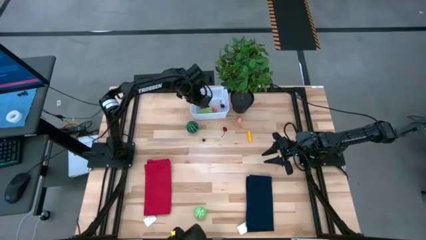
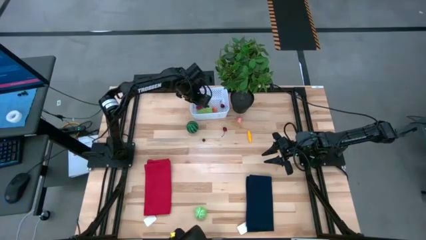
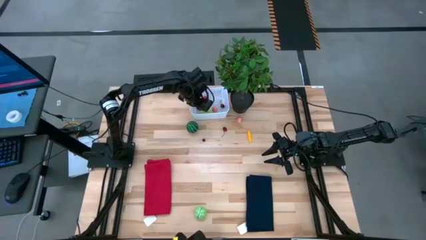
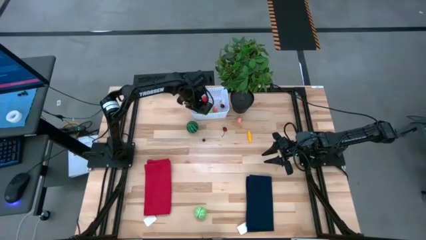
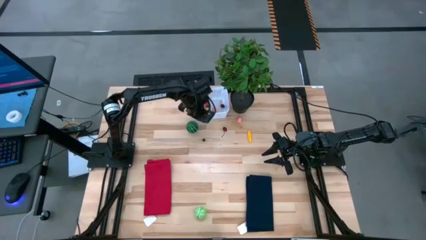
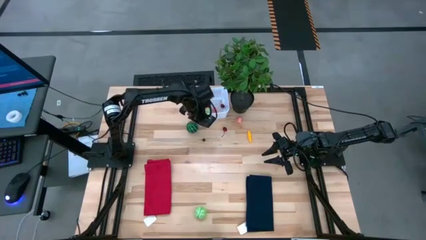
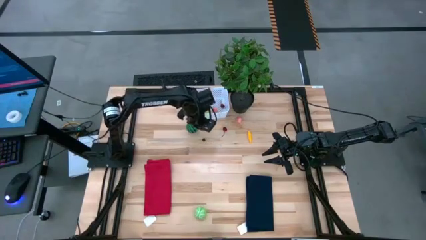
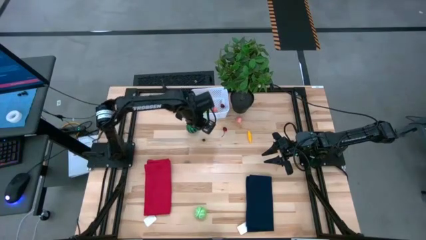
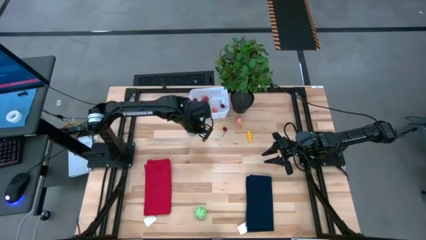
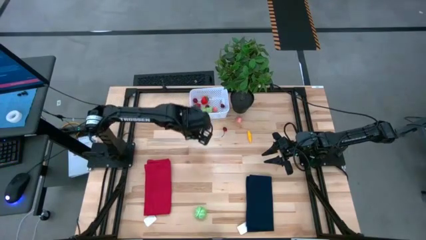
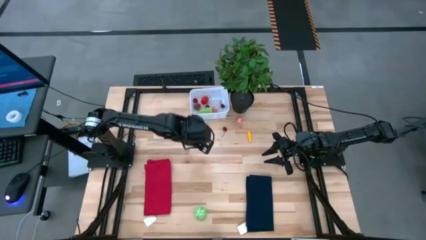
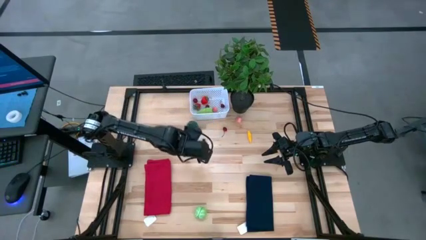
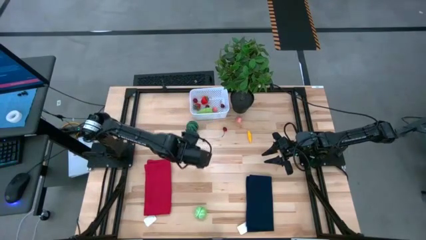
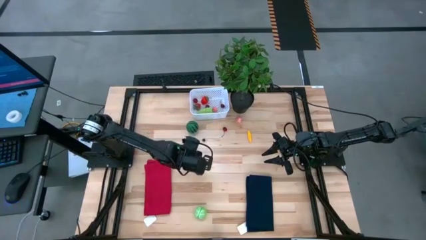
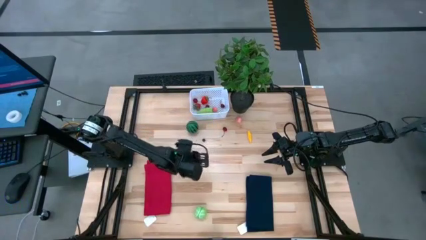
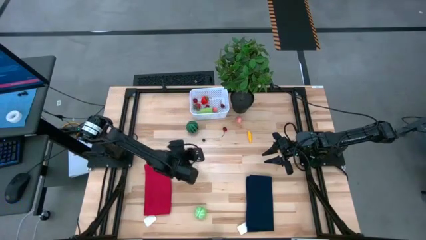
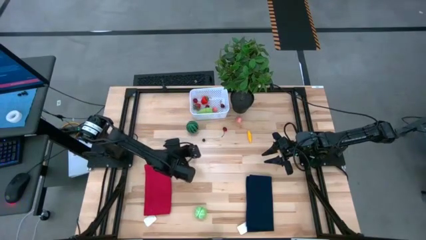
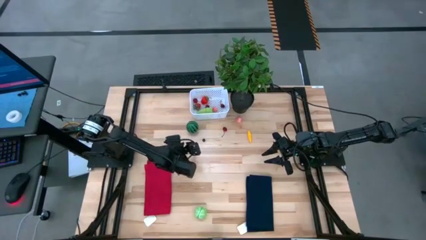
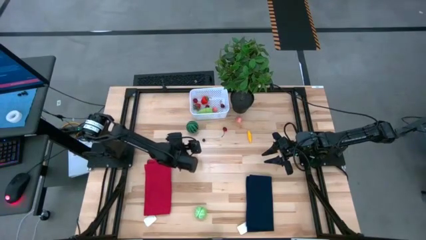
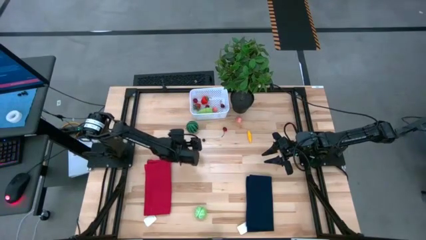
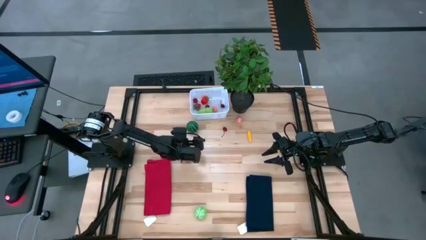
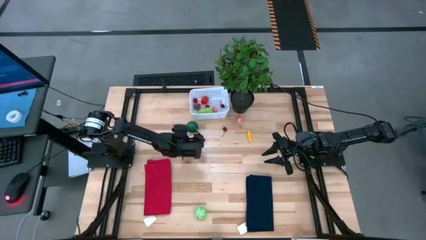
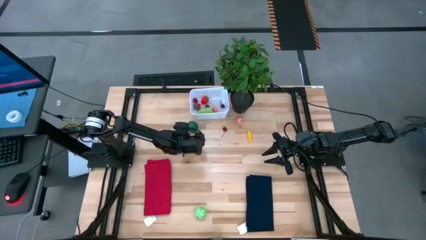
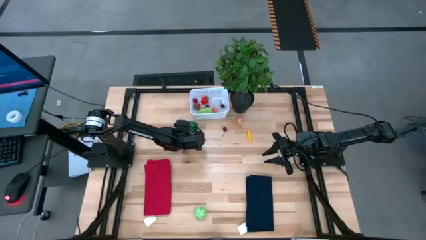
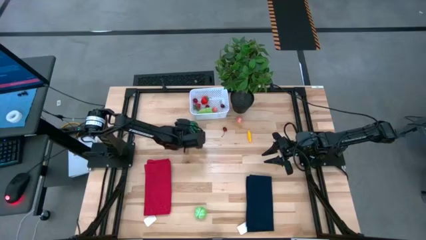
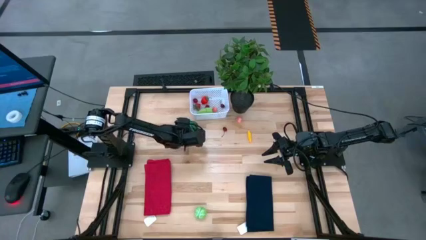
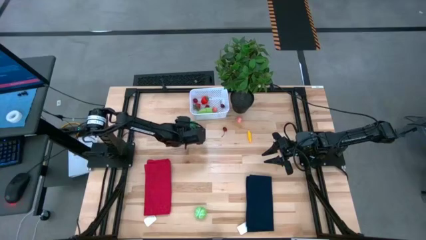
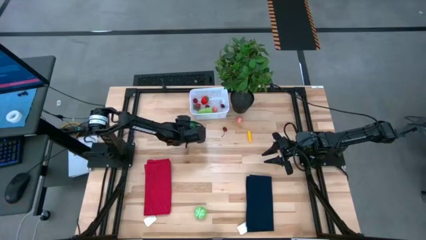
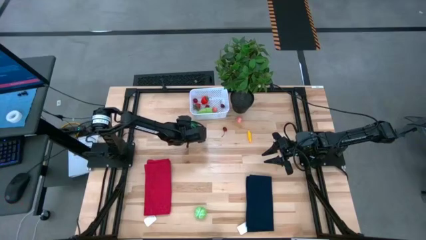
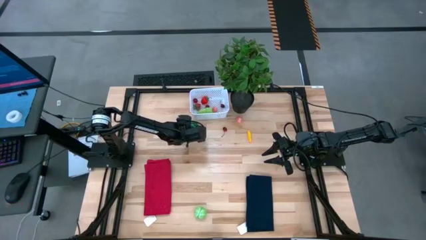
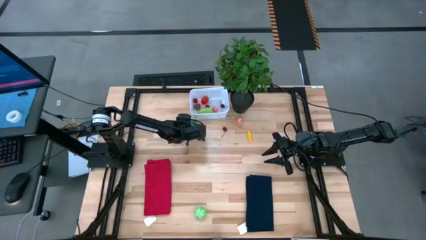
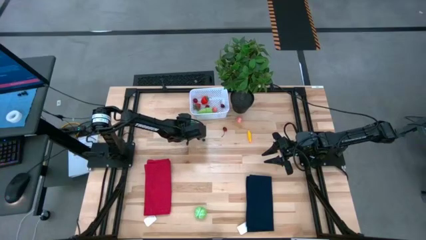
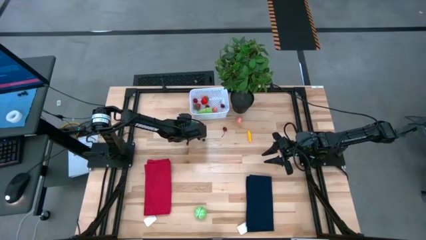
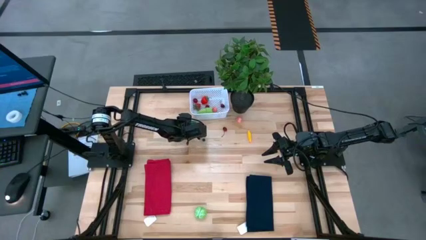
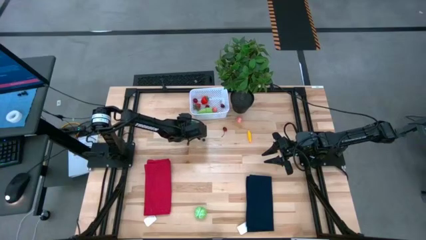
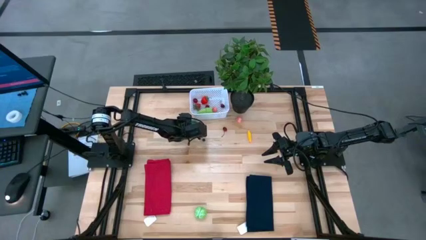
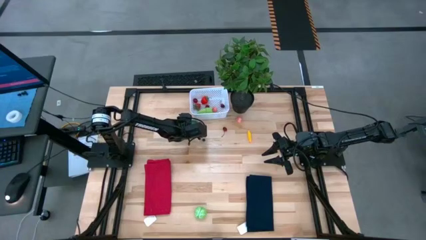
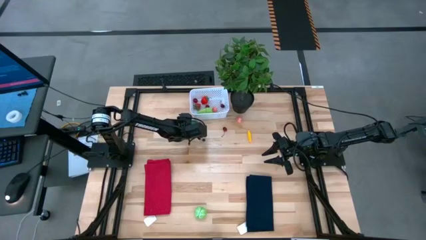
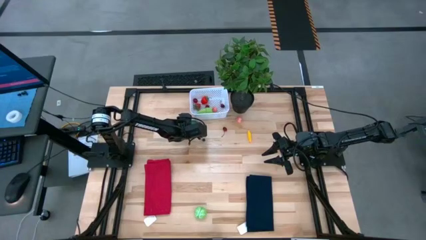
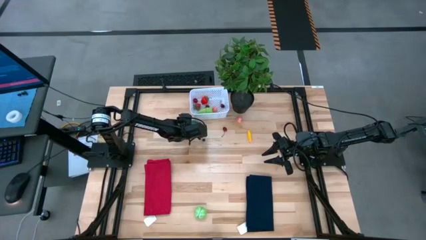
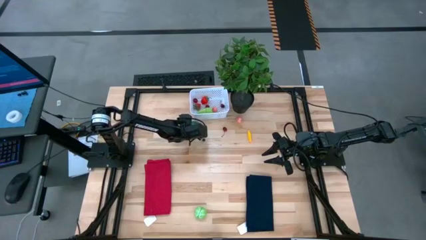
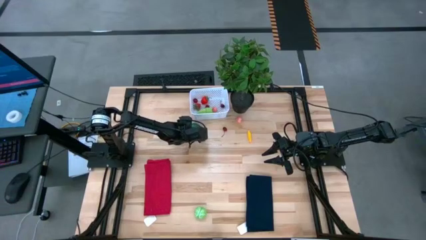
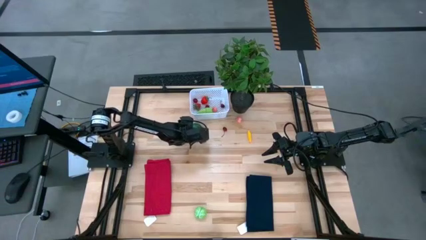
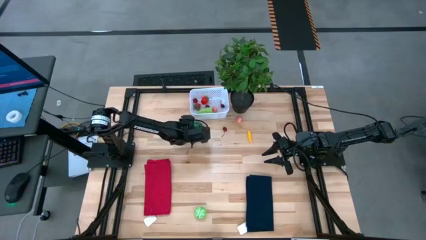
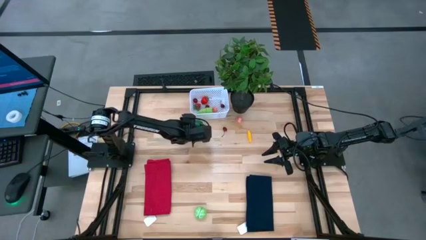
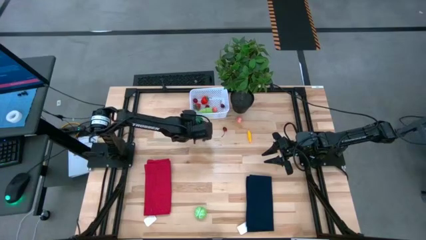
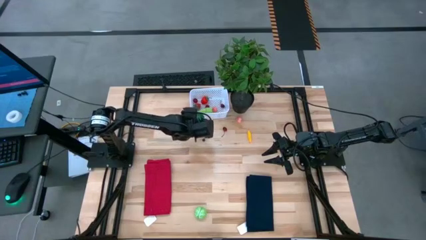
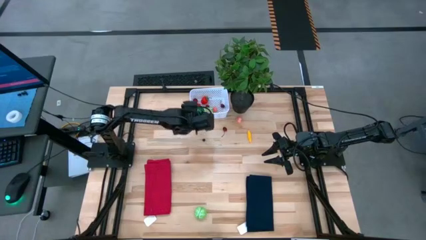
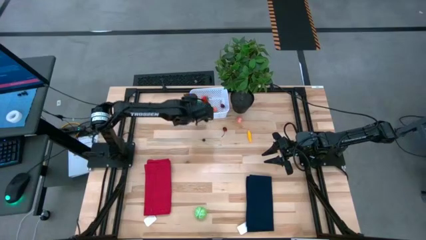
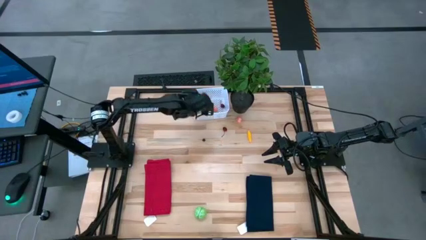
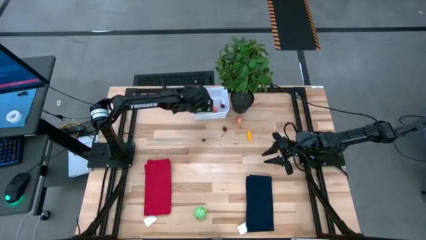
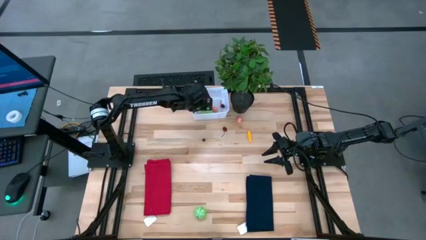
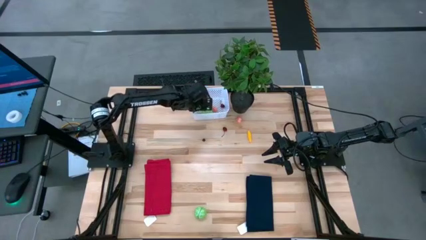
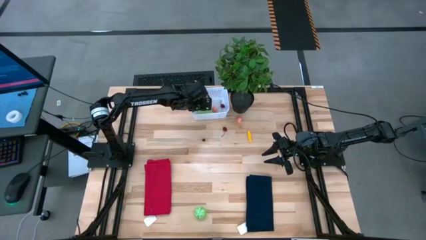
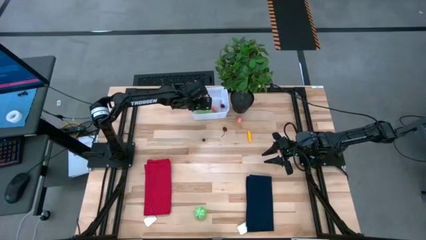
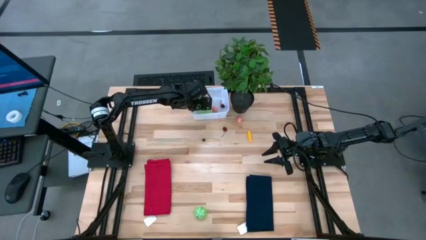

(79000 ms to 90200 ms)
Task: Pick and placing Produce into tupperware
Put the green watermelon into the white basket

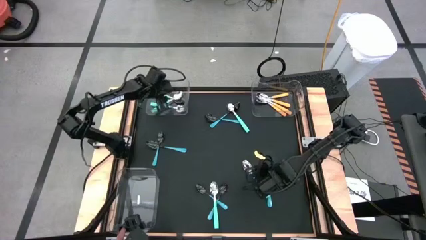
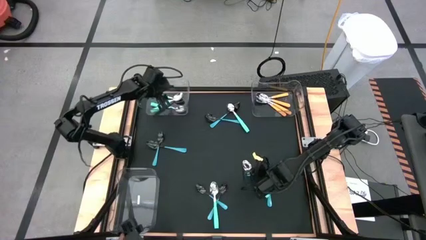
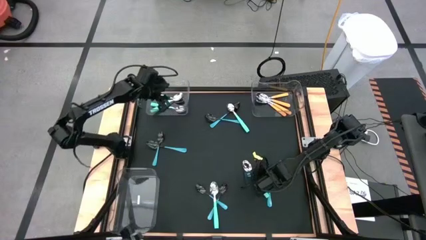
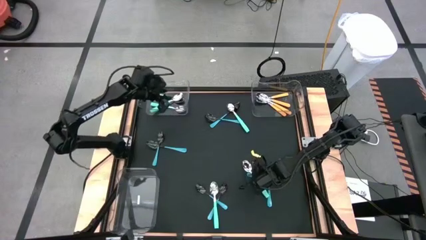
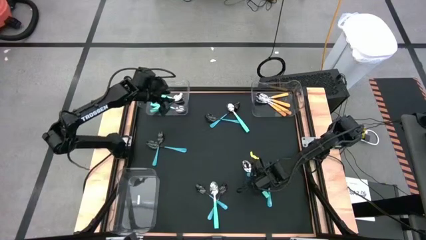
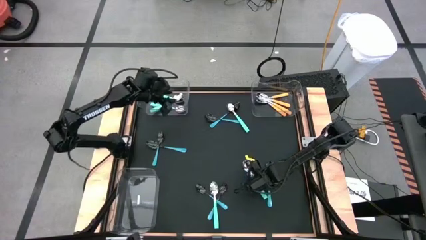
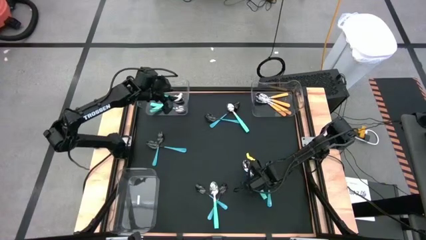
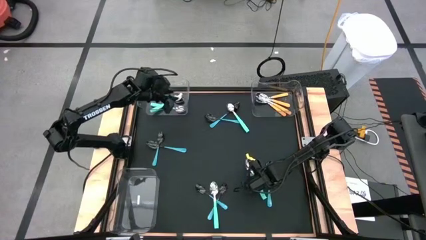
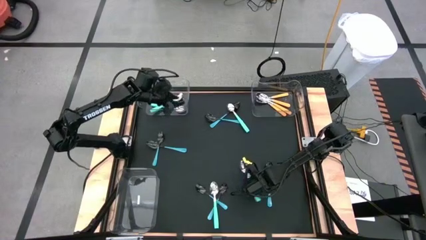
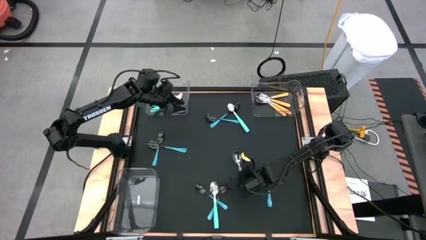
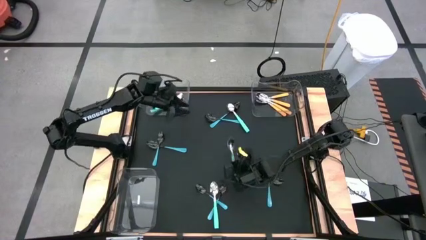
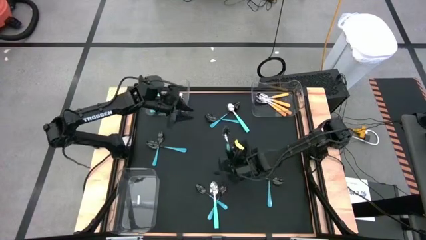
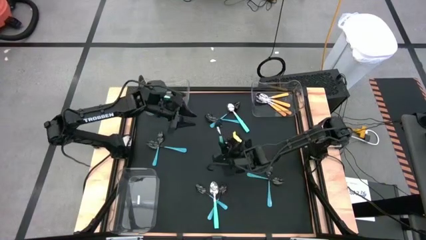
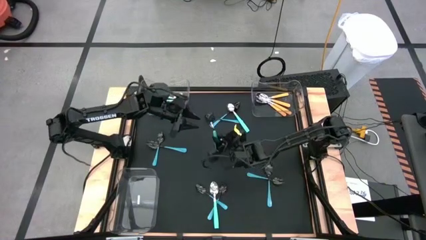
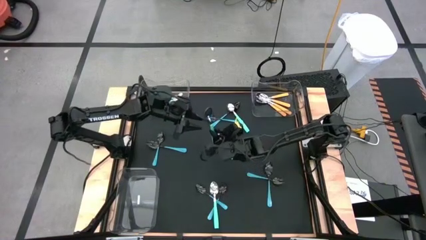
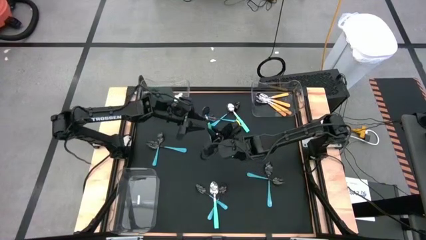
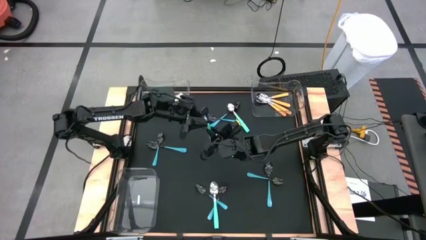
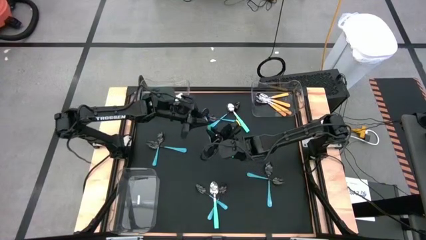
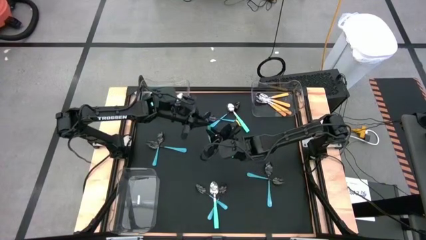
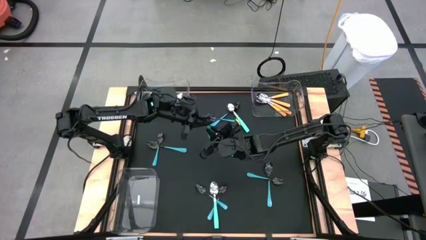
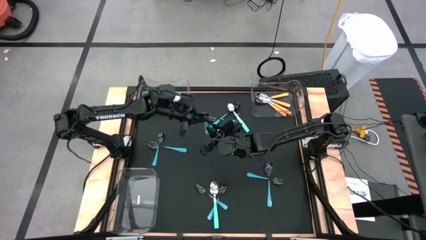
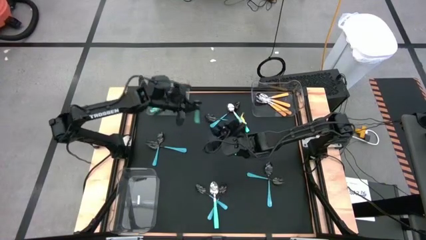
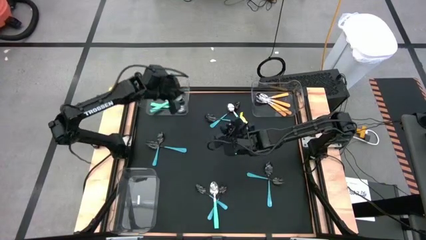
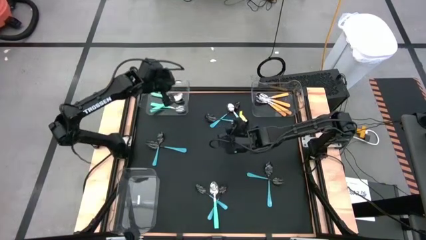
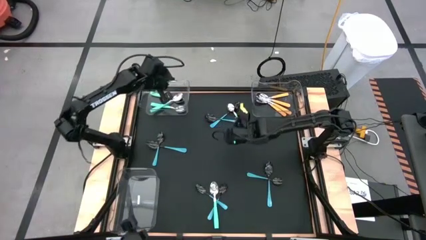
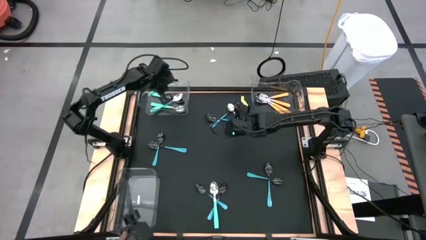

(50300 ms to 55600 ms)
Task: Sort silverware by color (type)
Put the light blue spoon into the top left transparent bin
